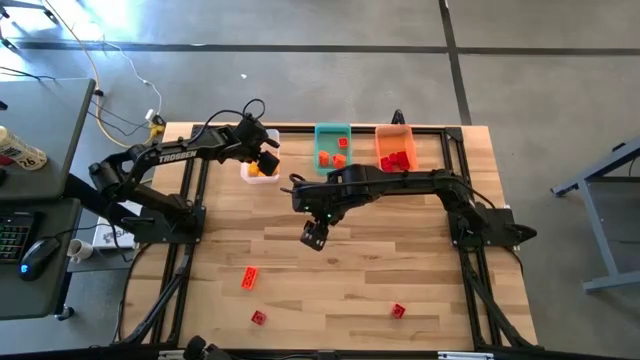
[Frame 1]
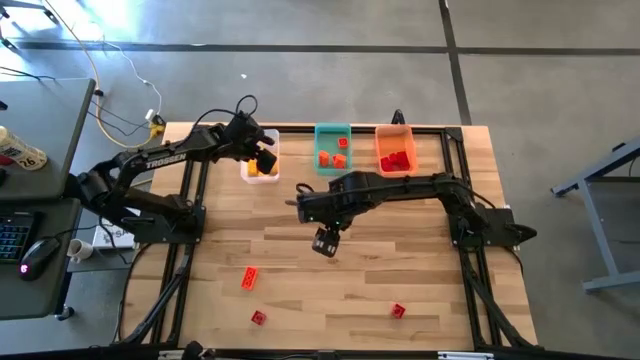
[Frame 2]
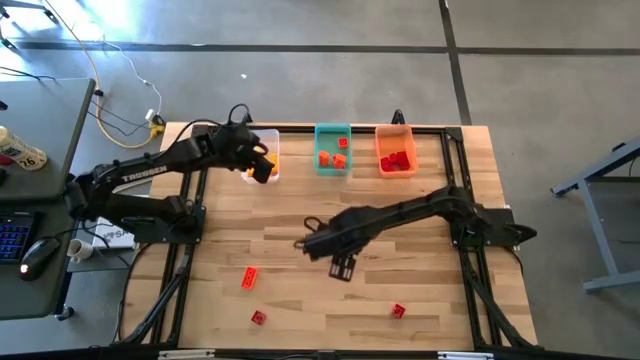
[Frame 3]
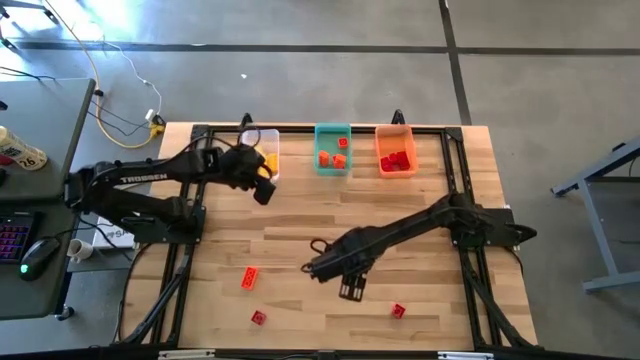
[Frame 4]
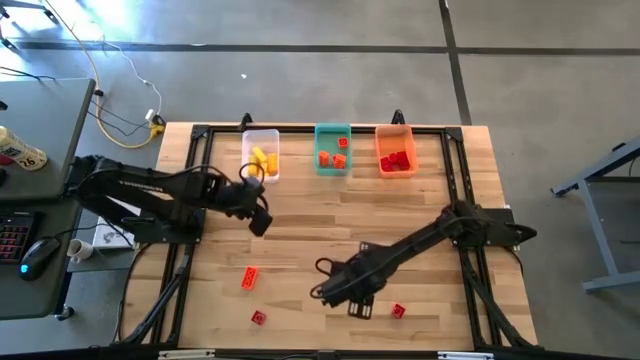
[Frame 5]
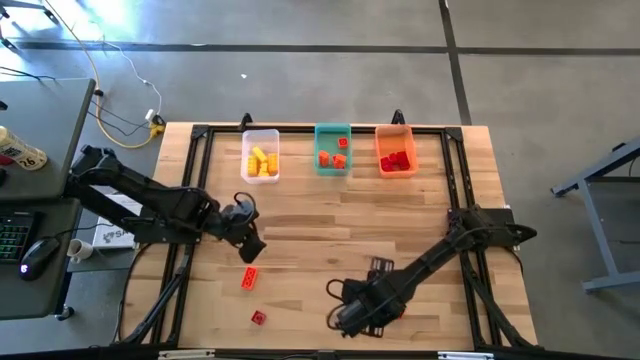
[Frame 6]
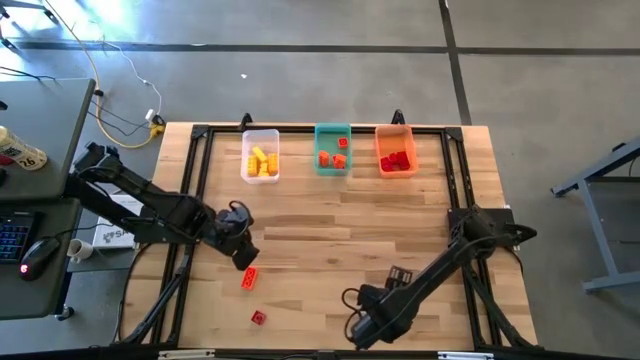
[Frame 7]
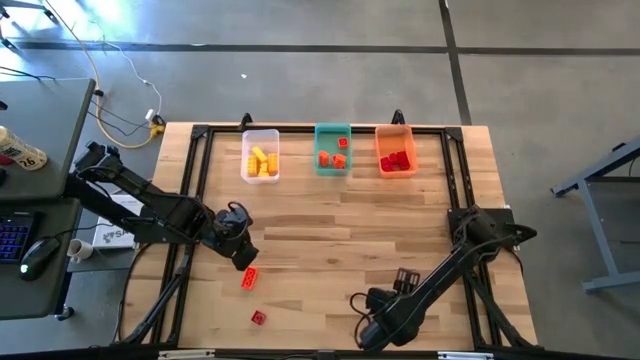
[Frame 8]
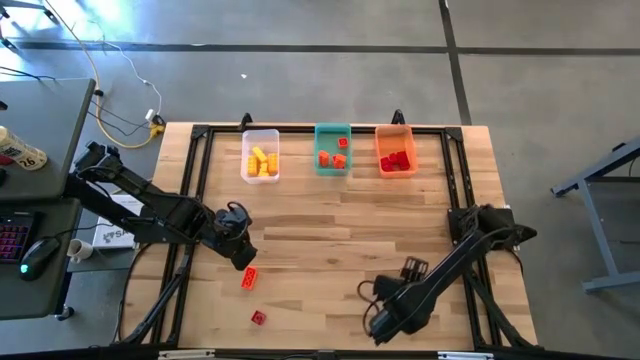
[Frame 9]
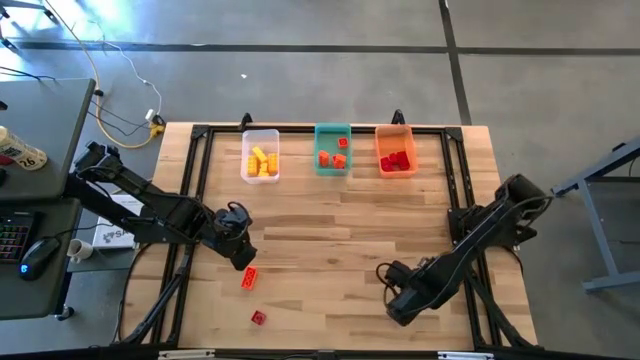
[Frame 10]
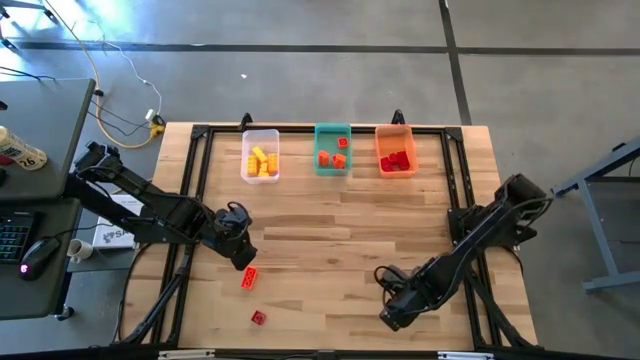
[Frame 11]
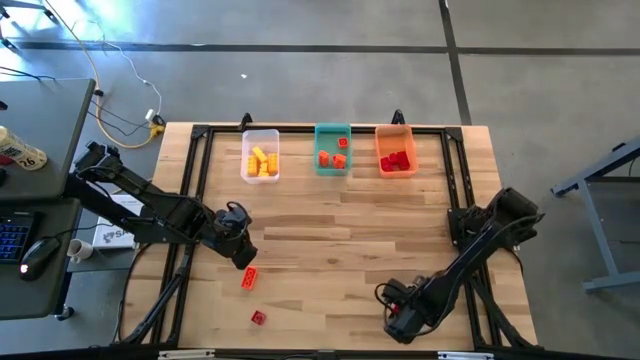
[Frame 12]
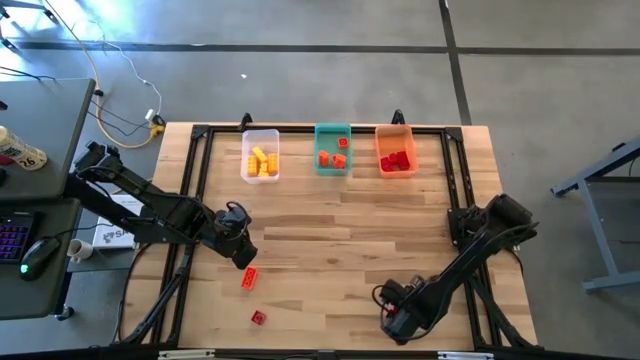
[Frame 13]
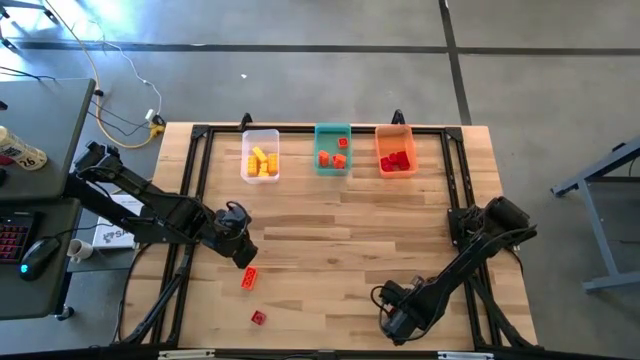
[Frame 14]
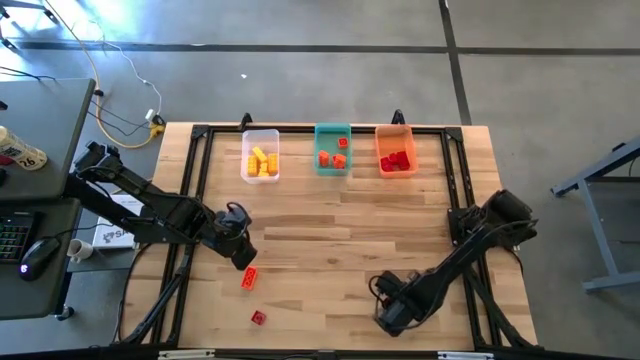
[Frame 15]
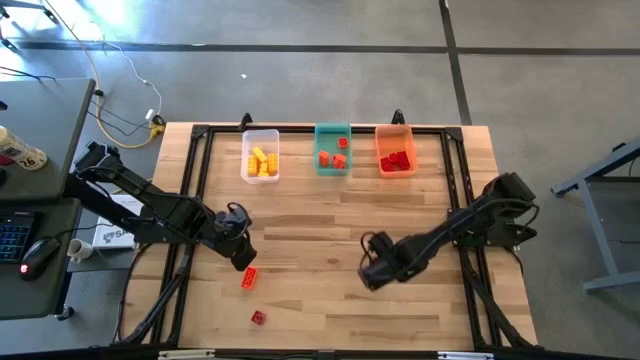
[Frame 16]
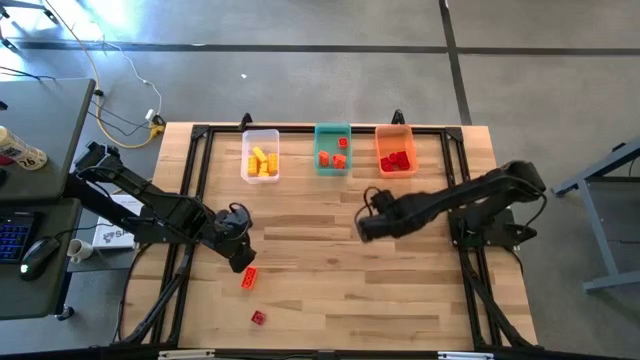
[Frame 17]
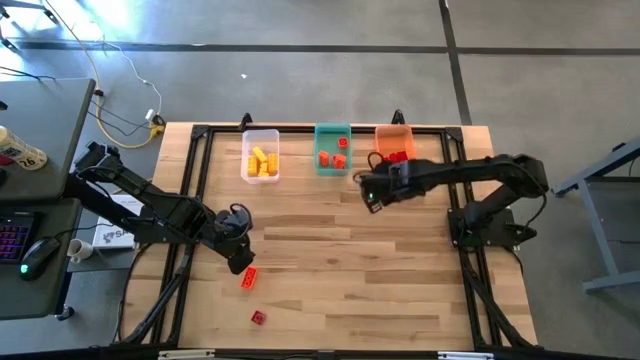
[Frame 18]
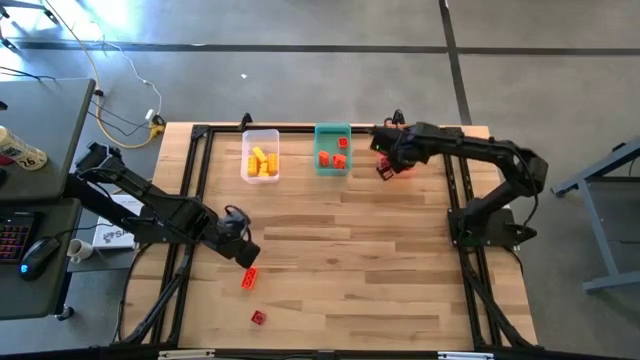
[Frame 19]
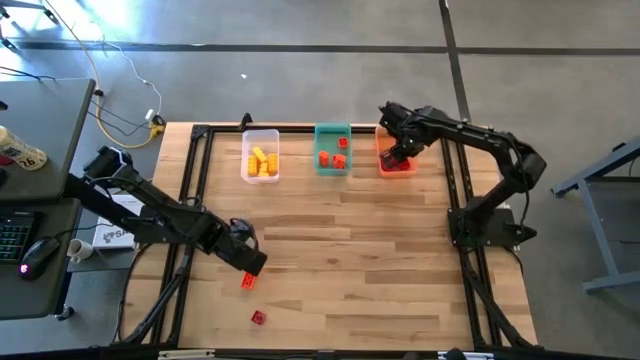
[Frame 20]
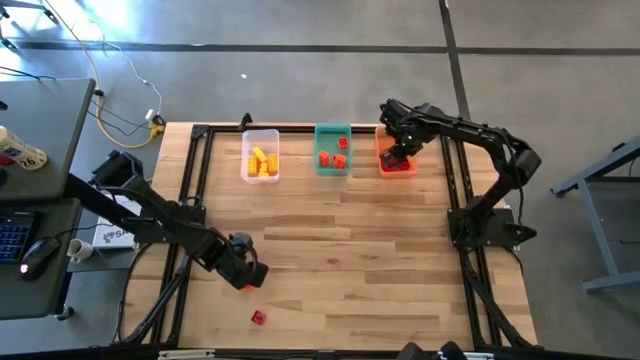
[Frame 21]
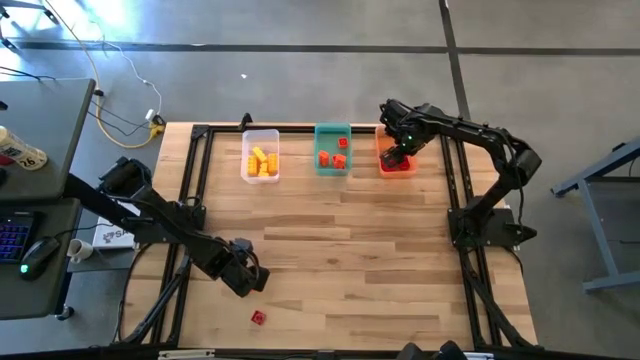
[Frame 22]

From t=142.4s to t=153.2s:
Task: Sort & place blocks by color
Put the red game piece into the orange bin

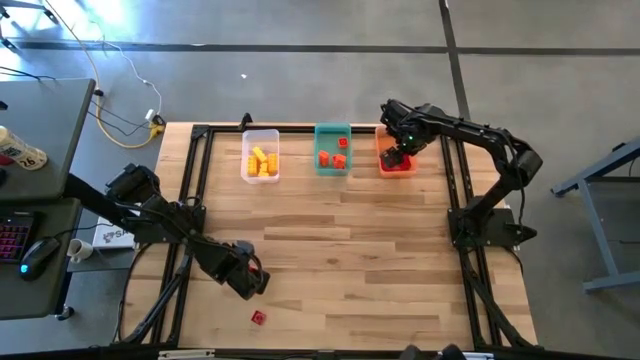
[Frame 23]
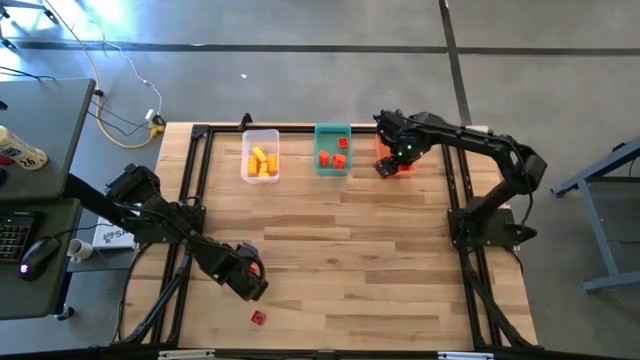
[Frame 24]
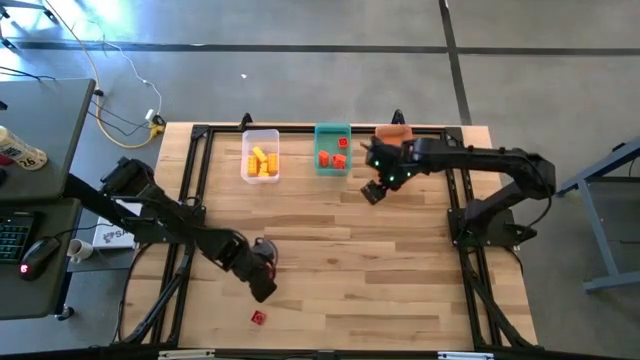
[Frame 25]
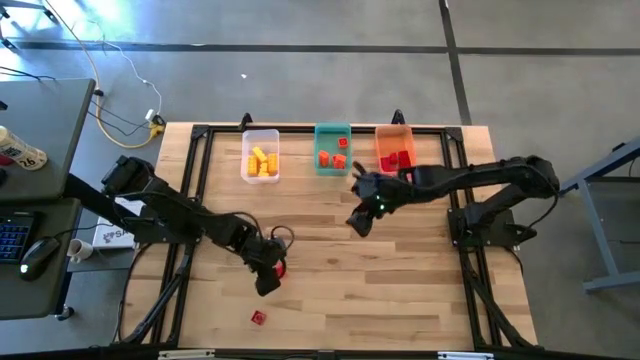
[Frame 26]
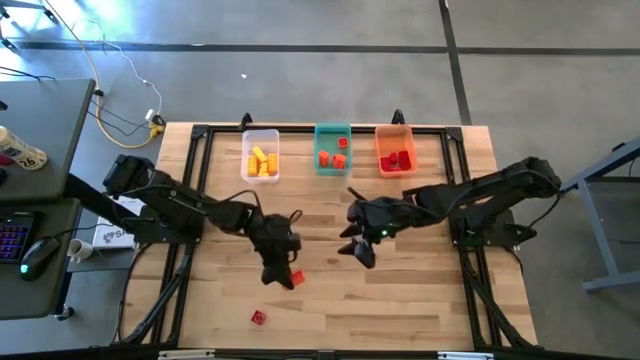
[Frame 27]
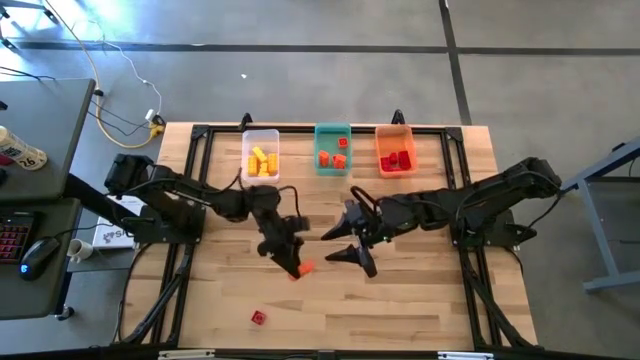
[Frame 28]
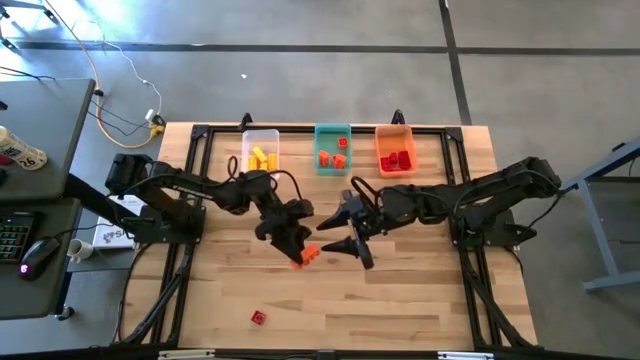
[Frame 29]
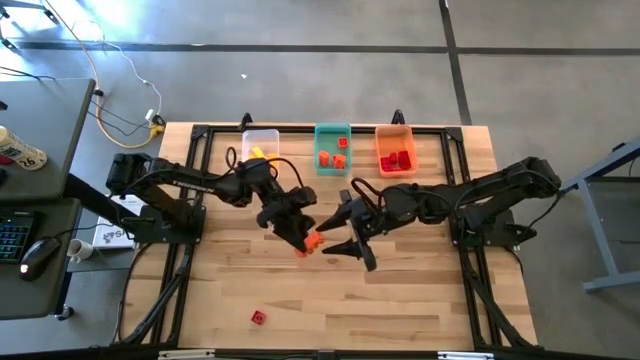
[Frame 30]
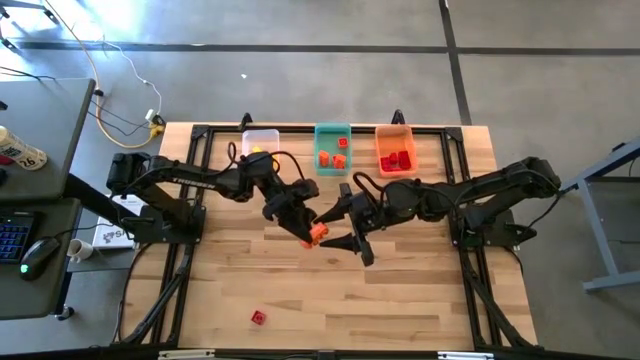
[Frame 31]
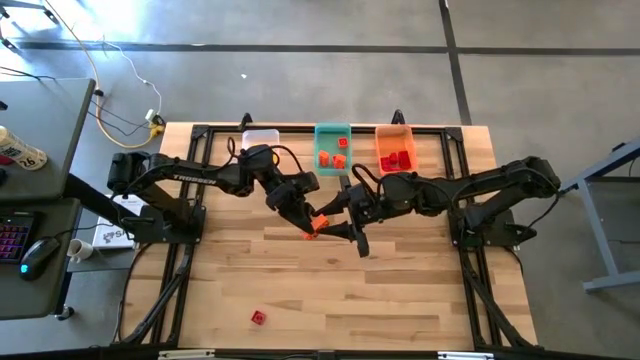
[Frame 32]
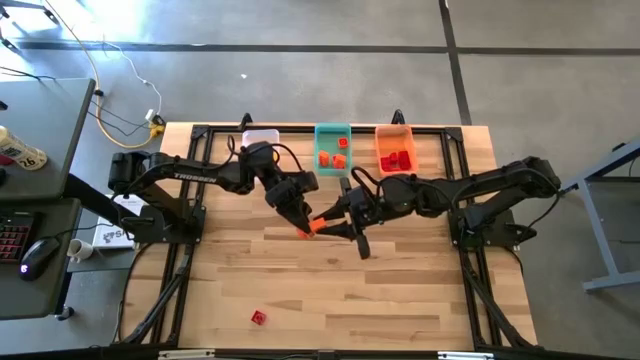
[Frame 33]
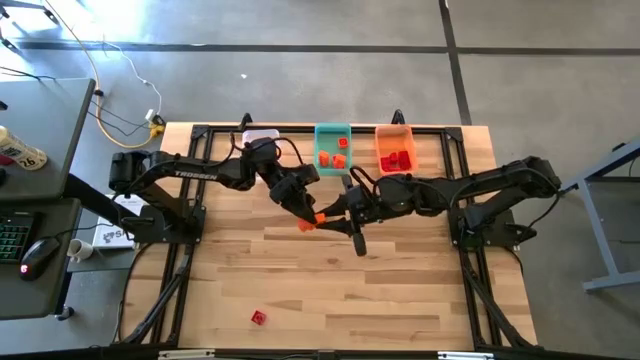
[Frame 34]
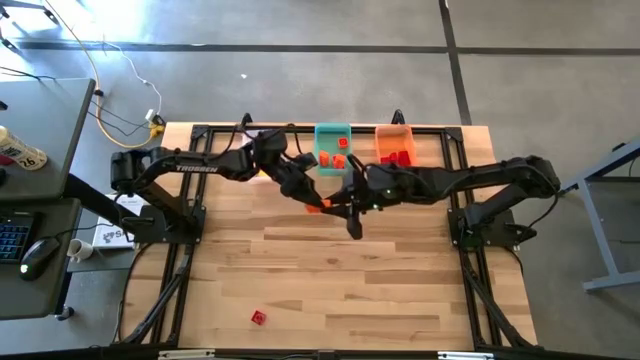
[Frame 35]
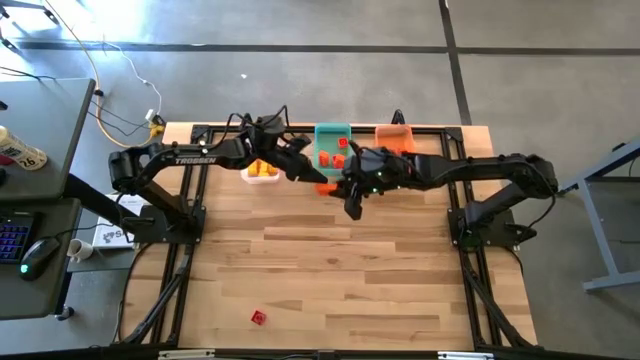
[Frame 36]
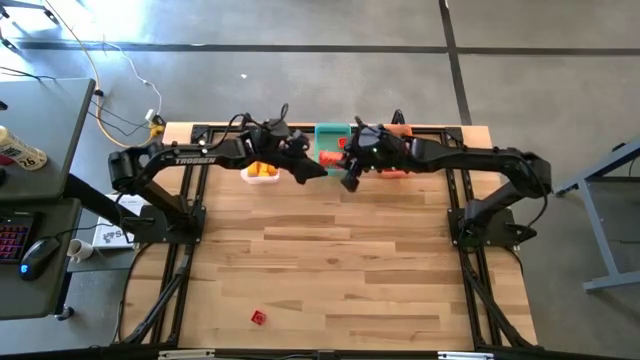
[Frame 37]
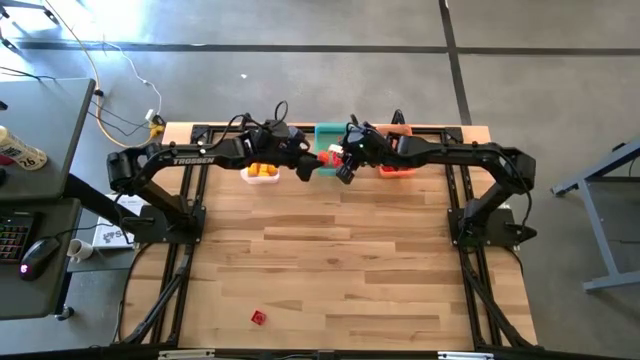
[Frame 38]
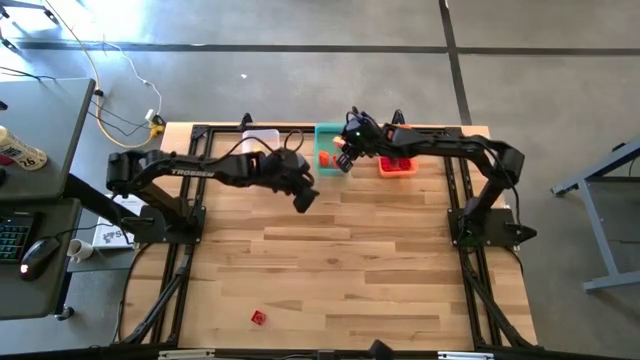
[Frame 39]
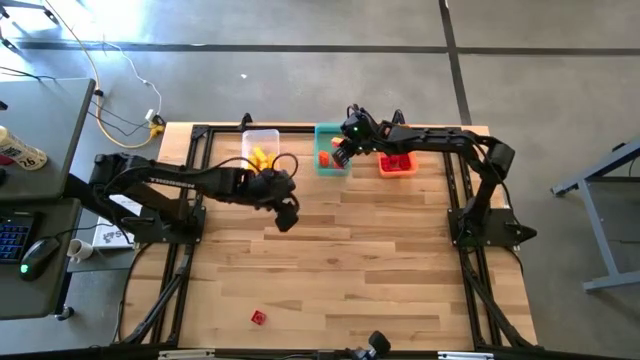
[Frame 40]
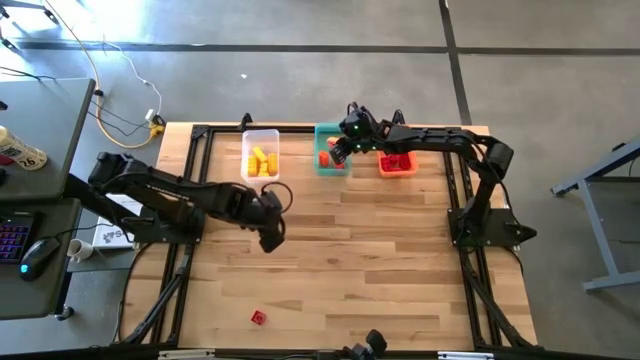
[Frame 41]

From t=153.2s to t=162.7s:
Put the orange game piece into the blue bin

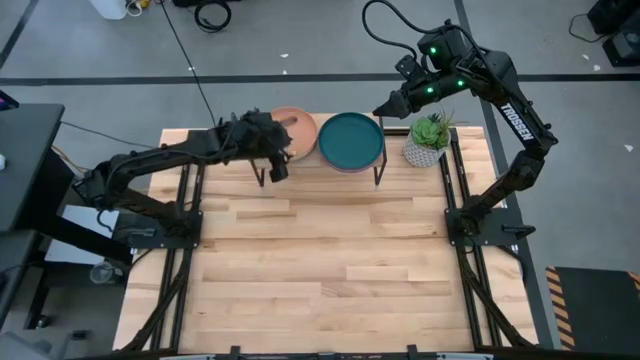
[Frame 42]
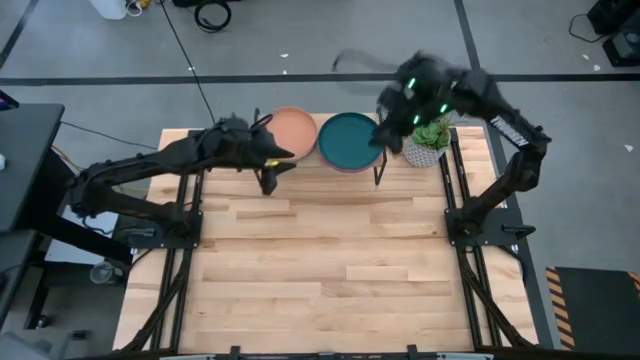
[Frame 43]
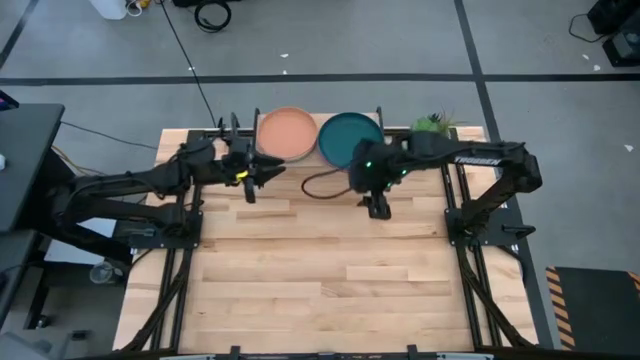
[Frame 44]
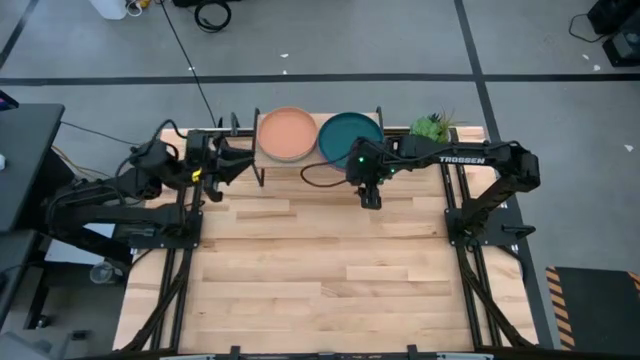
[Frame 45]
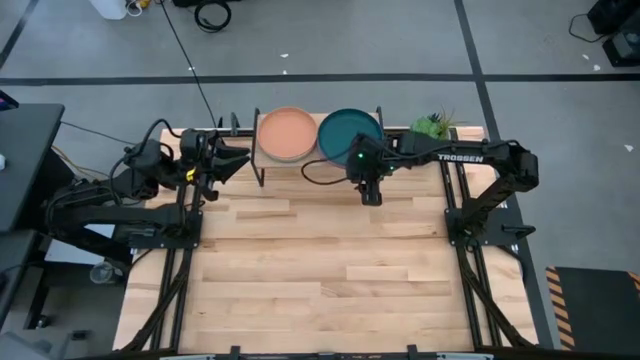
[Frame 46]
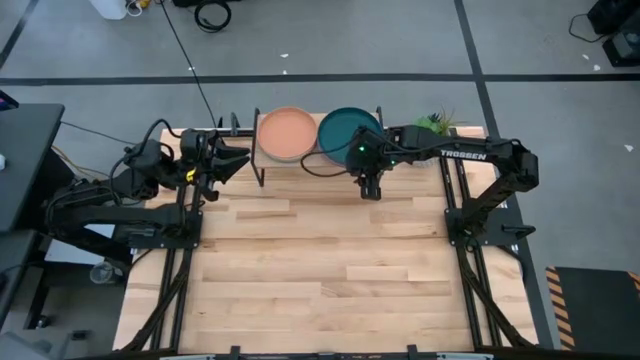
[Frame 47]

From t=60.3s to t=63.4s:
Task: Place and stack plates onto a shelf
Adjust the stacked plates on the shelf
